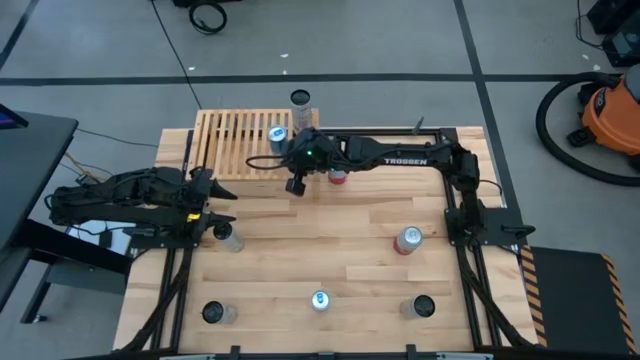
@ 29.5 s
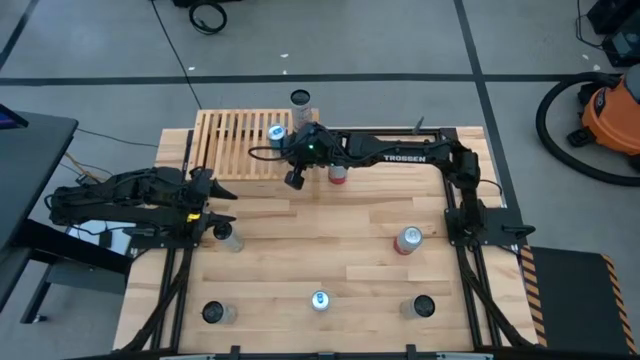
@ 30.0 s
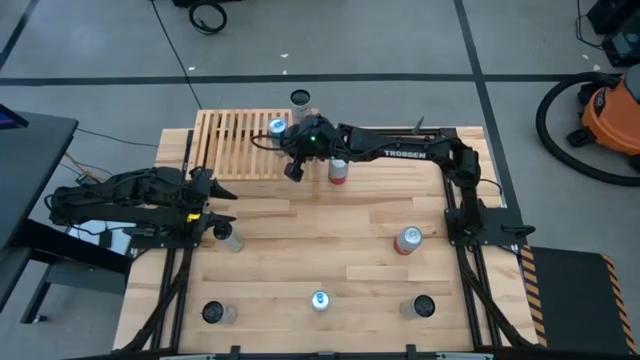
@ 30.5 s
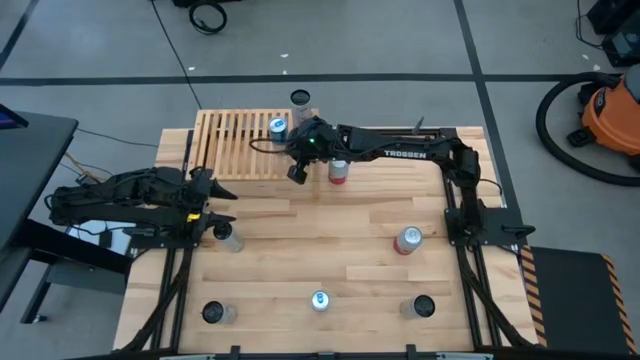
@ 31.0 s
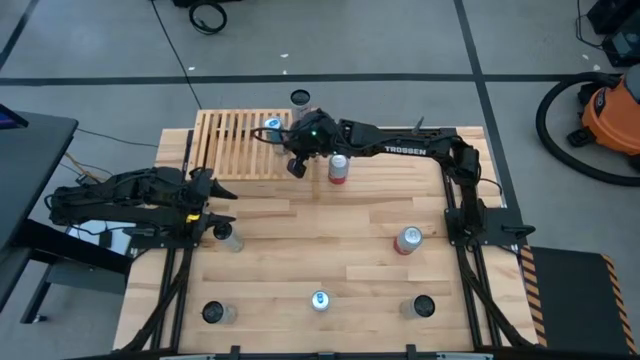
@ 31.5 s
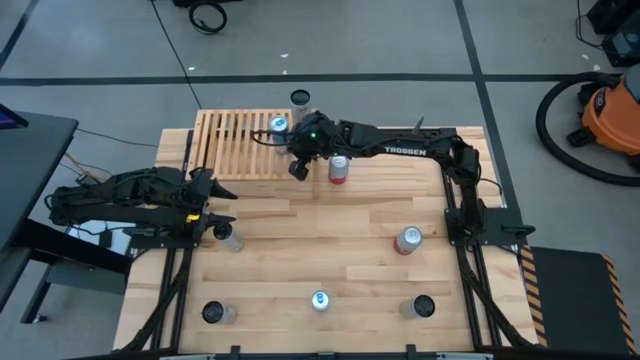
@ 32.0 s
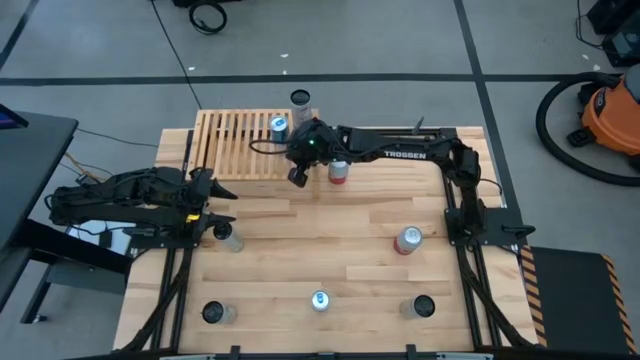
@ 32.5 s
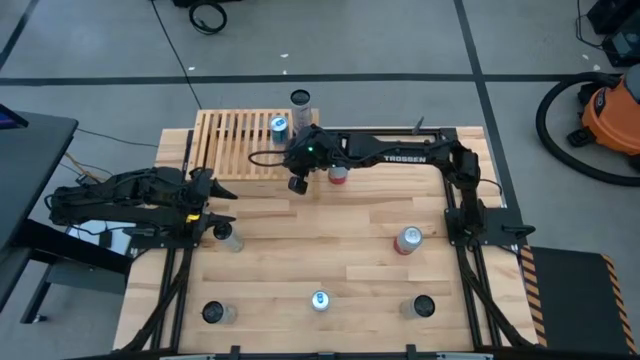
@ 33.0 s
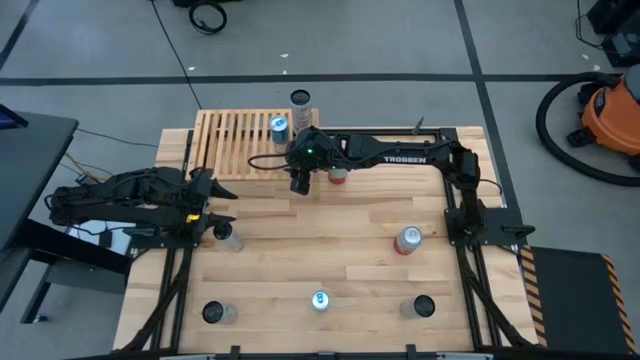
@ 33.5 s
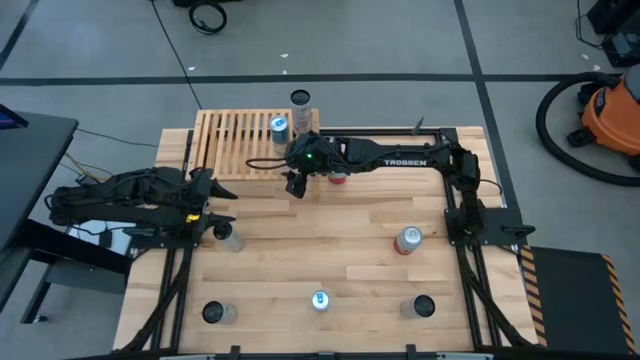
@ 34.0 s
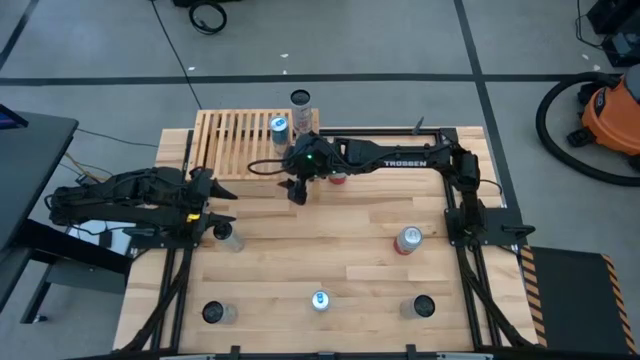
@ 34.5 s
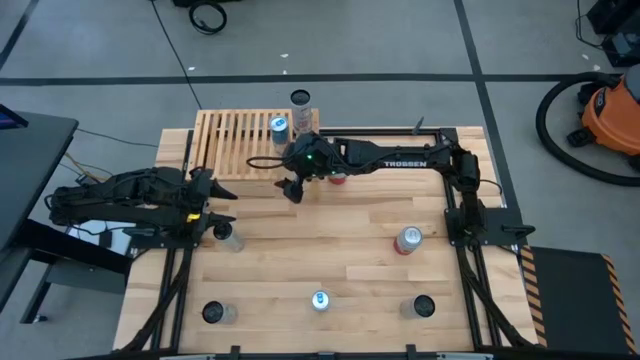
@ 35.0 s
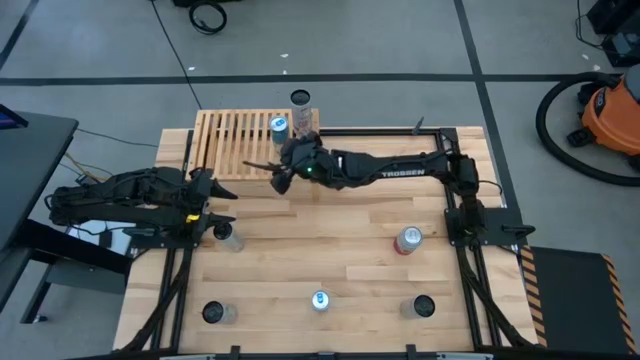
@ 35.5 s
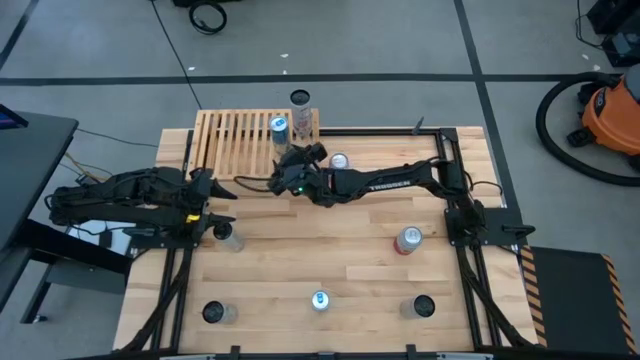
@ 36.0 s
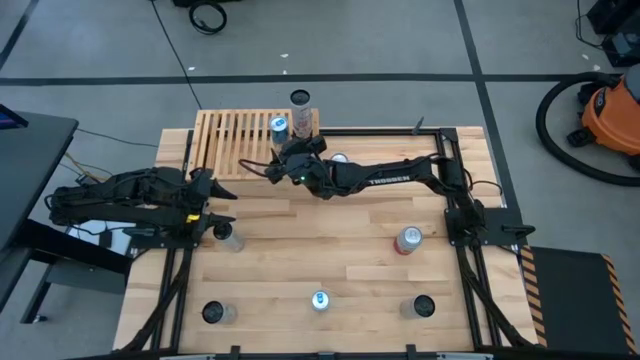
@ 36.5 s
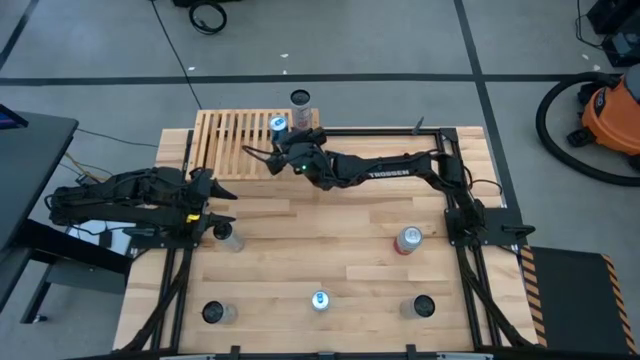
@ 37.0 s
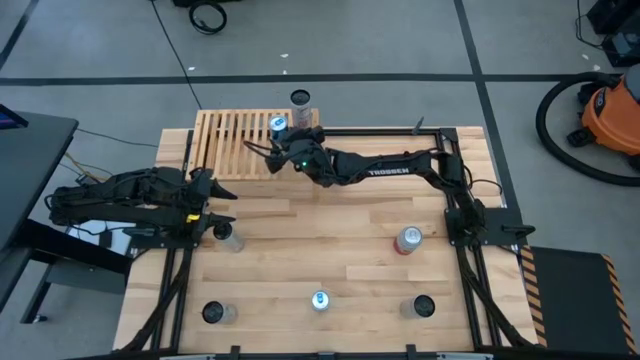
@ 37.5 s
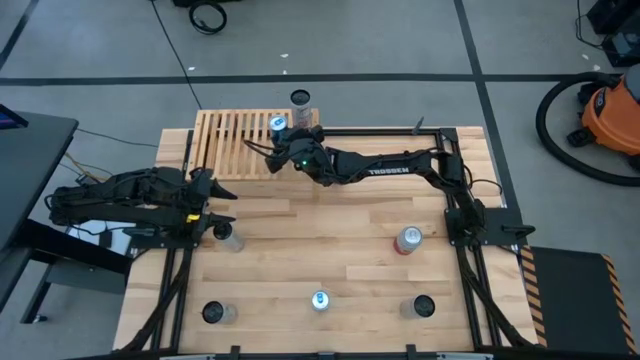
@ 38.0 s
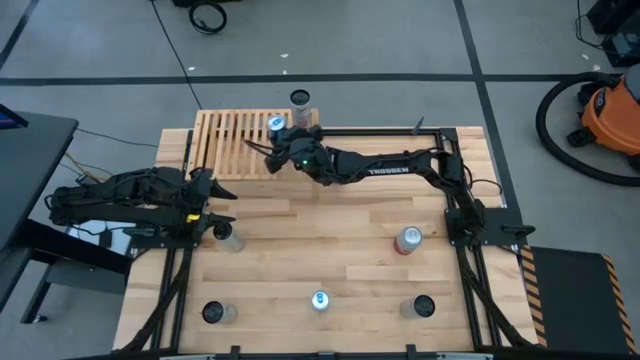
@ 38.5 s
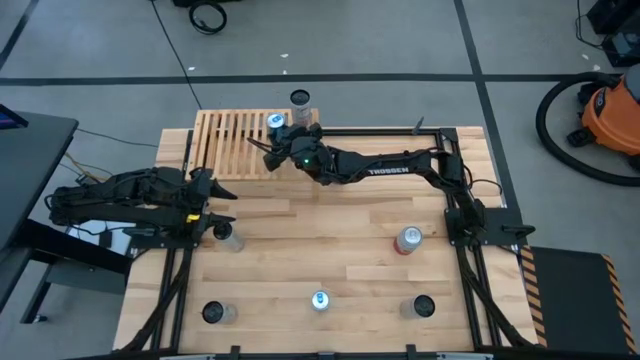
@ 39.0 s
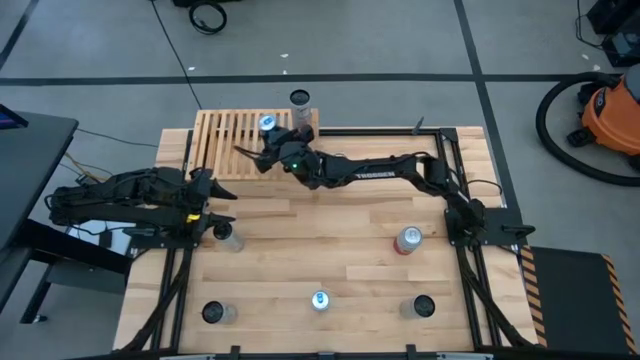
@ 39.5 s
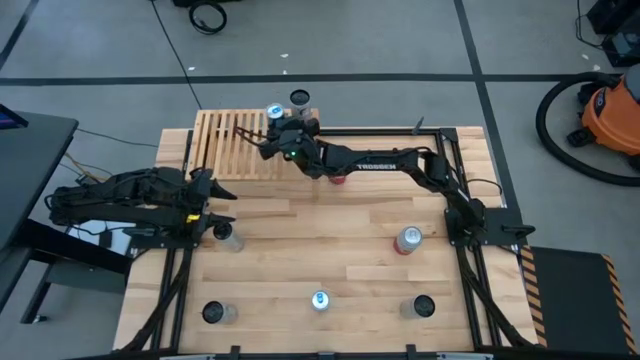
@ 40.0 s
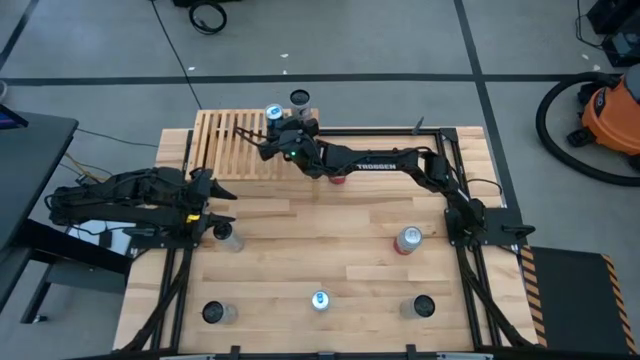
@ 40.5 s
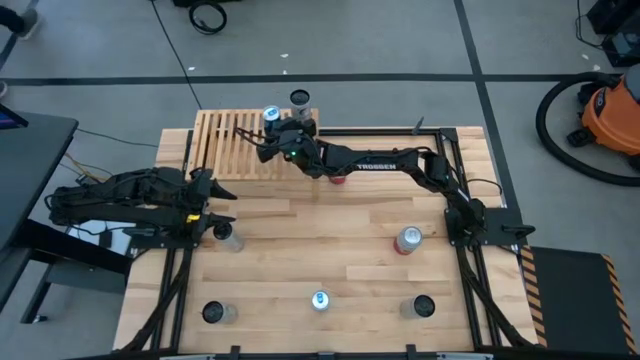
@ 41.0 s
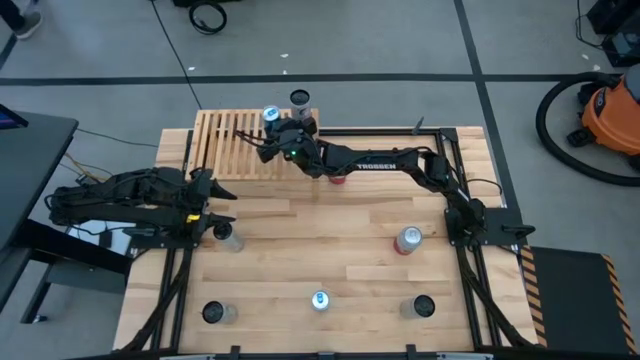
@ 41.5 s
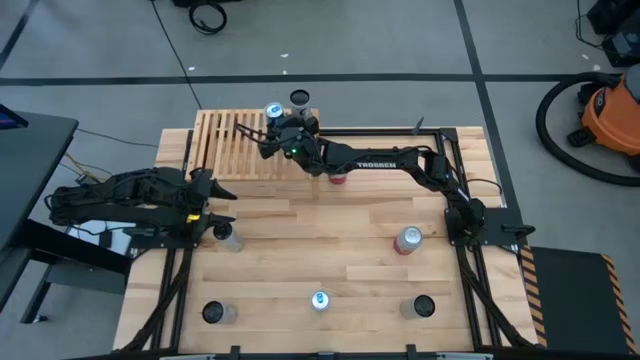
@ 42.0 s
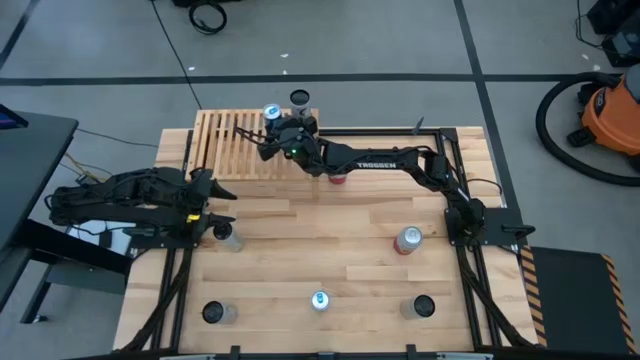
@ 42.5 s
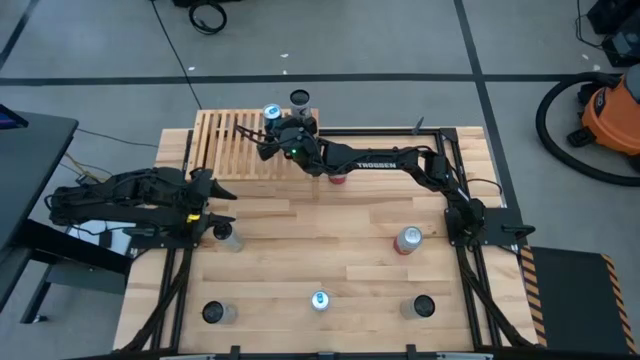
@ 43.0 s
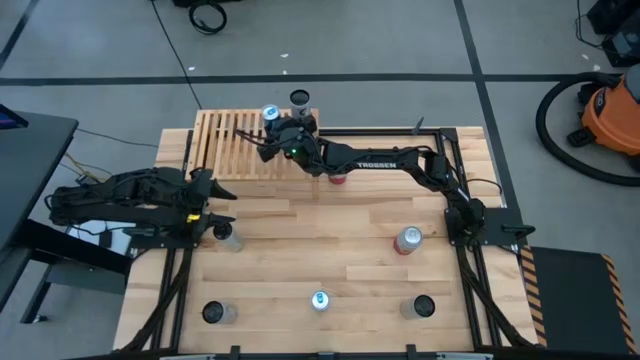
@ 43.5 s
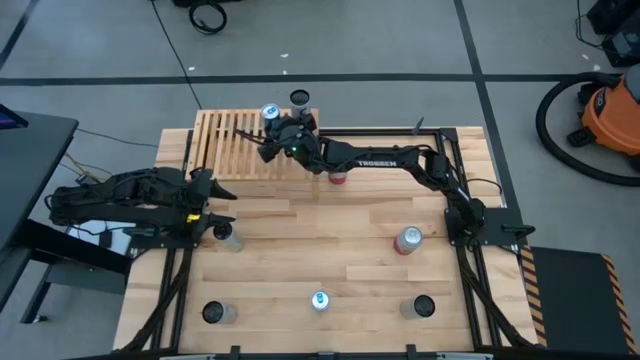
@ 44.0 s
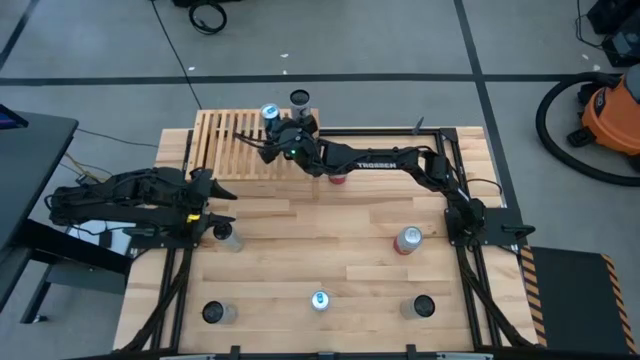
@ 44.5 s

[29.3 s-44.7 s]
Task: Place canned beverage on shelf
Put the top blue soda can on the shelf
